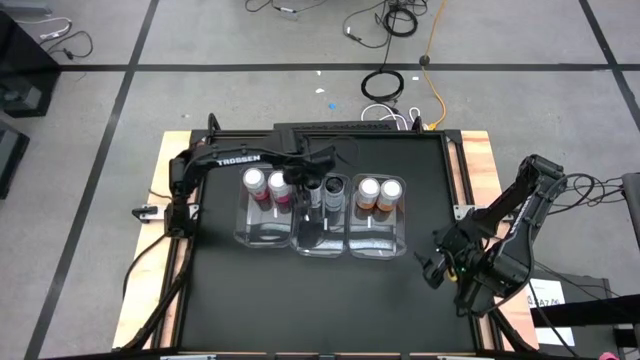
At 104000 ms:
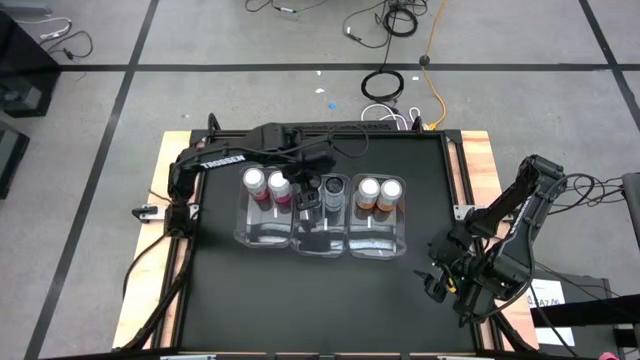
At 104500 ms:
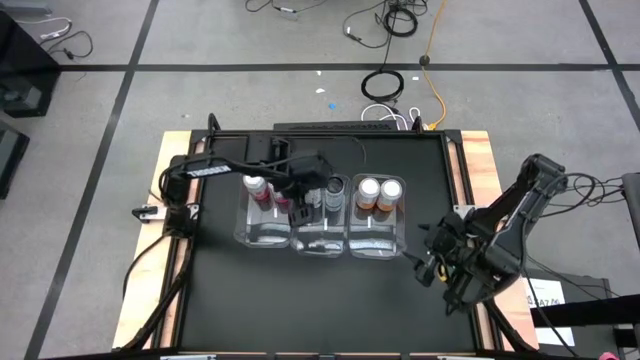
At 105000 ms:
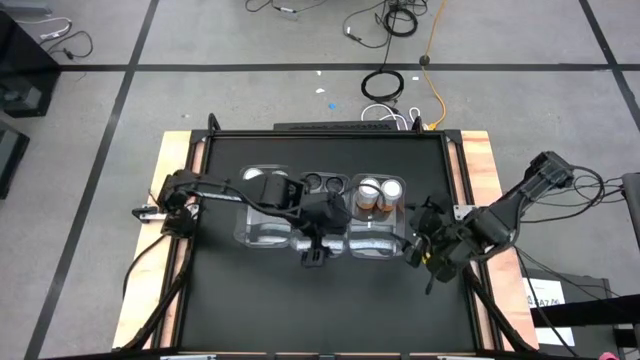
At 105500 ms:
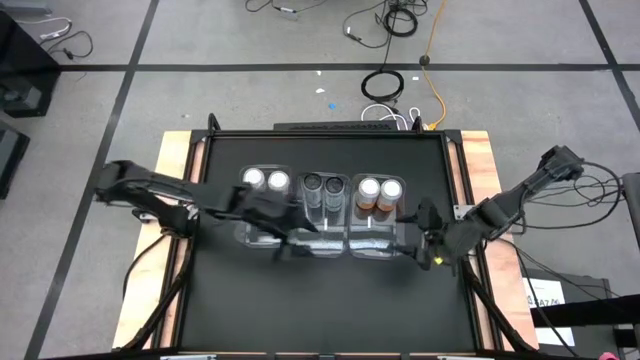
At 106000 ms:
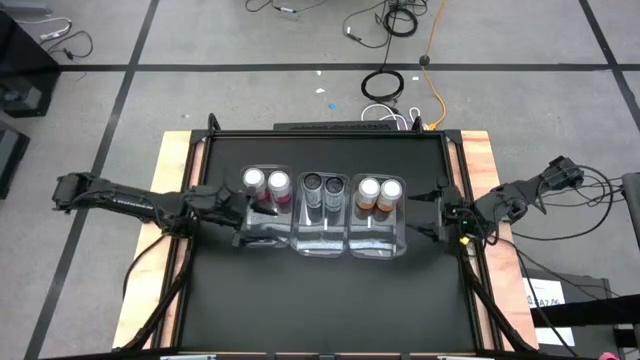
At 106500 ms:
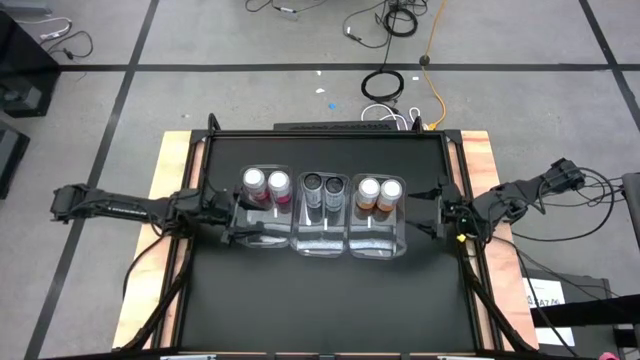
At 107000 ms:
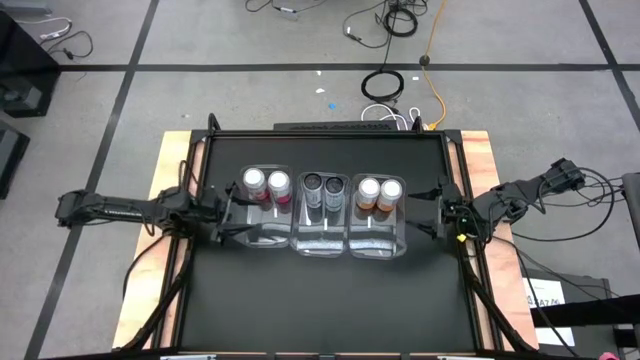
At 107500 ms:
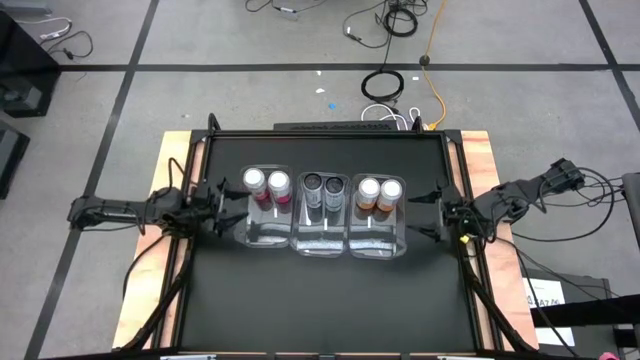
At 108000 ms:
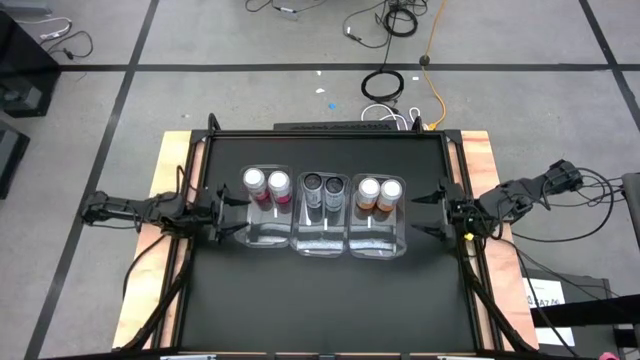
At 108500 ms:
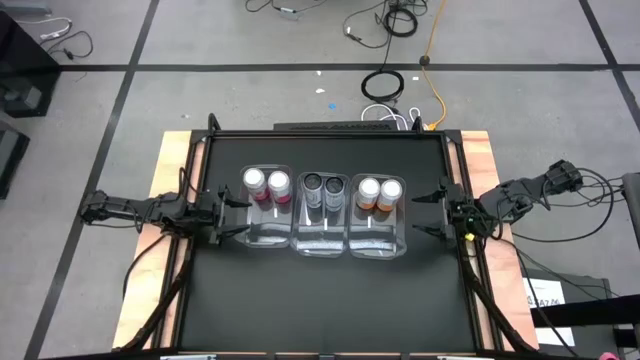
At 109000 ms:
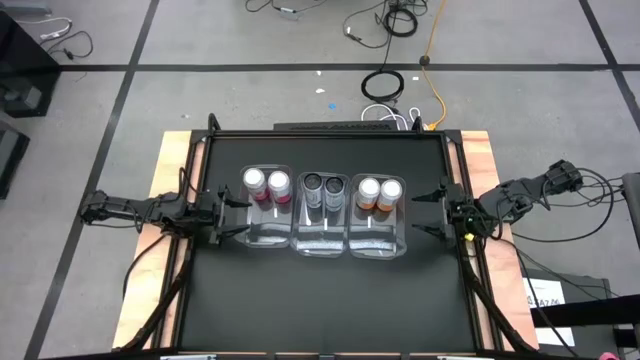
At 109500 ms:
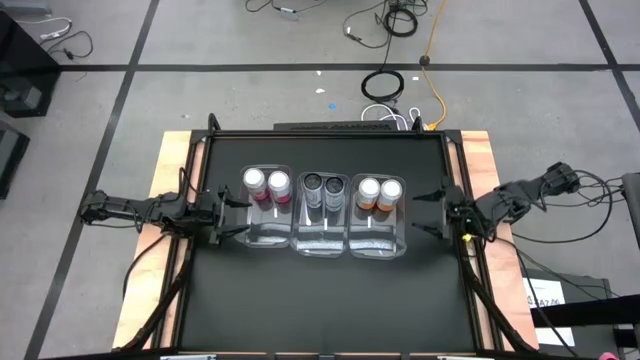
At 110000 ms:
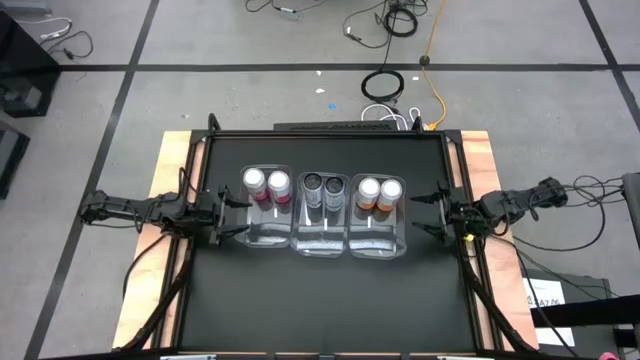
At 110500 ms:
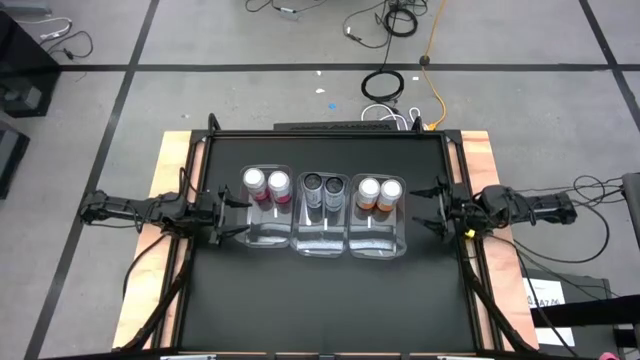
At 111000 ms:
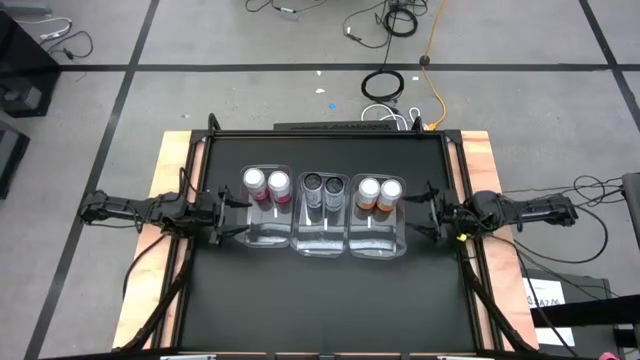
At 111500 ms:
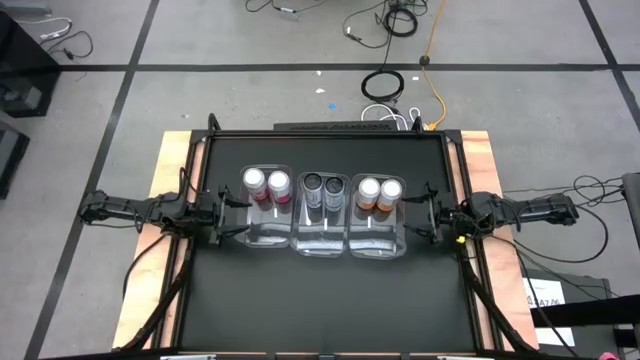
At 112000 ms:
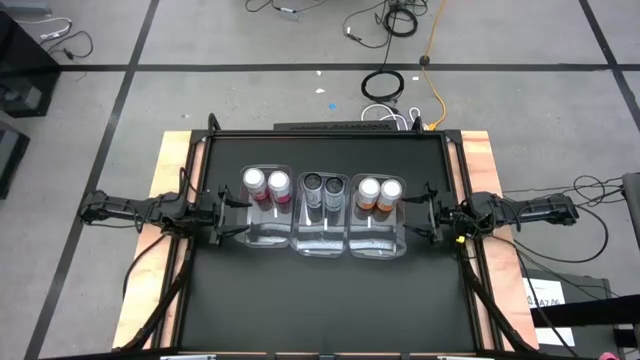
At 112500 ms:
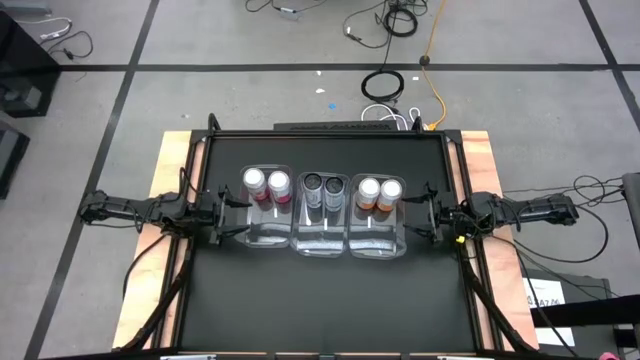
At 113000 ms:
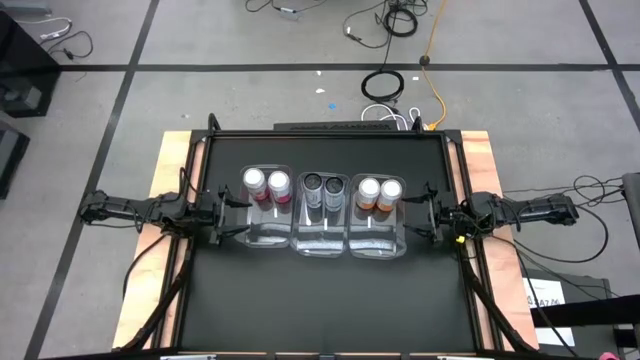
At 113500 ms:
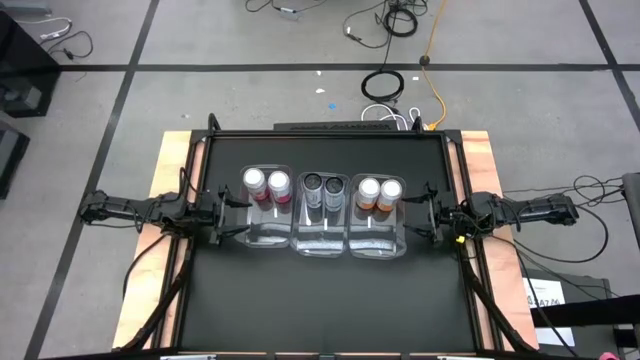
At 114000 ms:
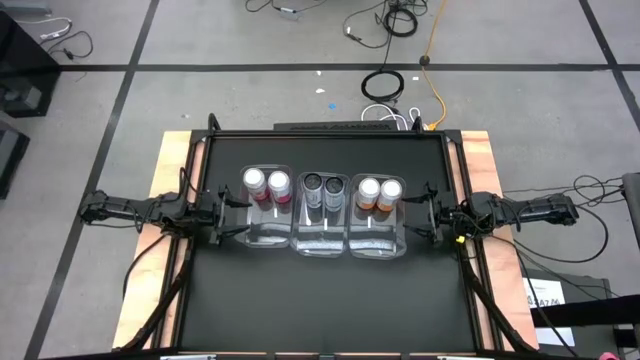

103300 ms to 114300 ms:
Task: Sort soda cans
Return to Home Position

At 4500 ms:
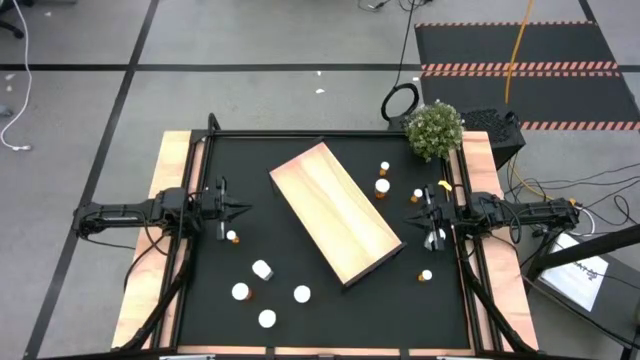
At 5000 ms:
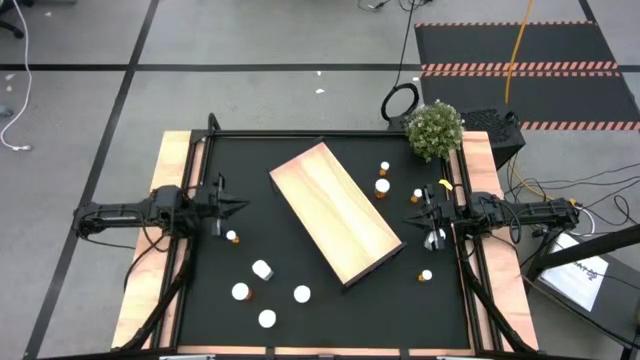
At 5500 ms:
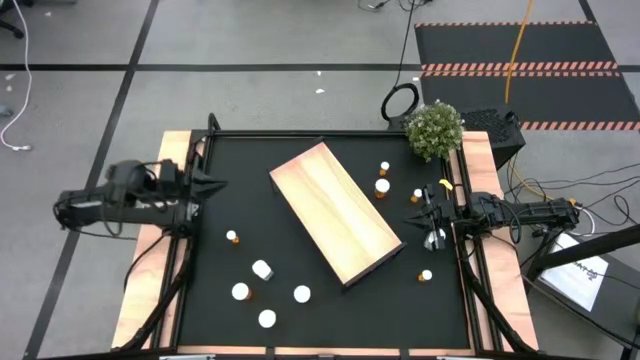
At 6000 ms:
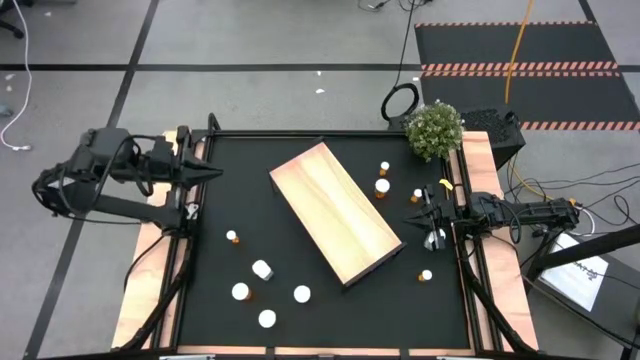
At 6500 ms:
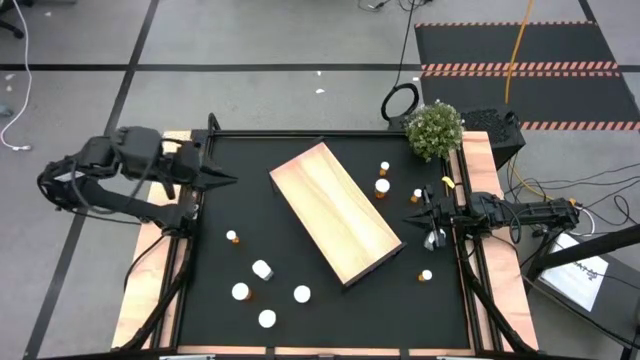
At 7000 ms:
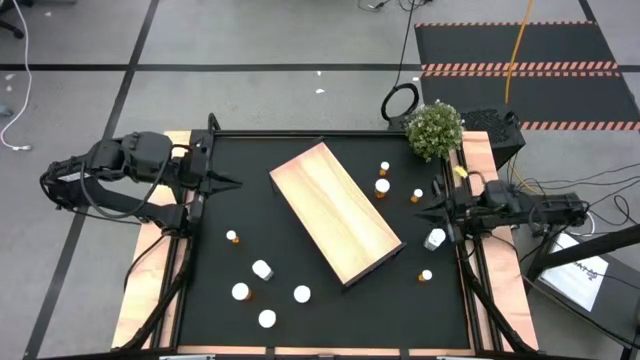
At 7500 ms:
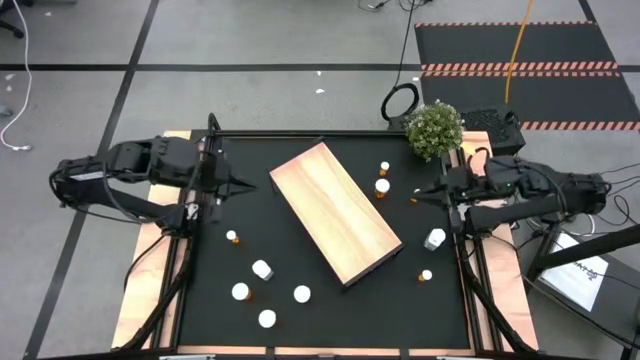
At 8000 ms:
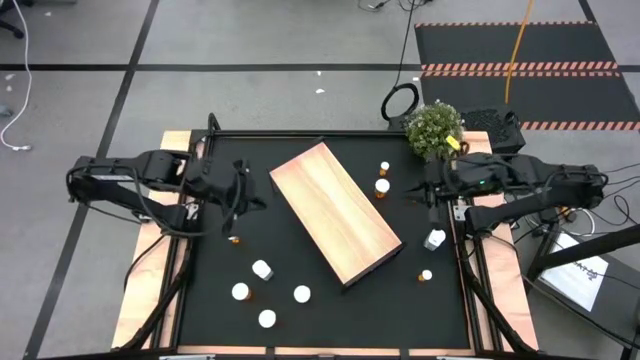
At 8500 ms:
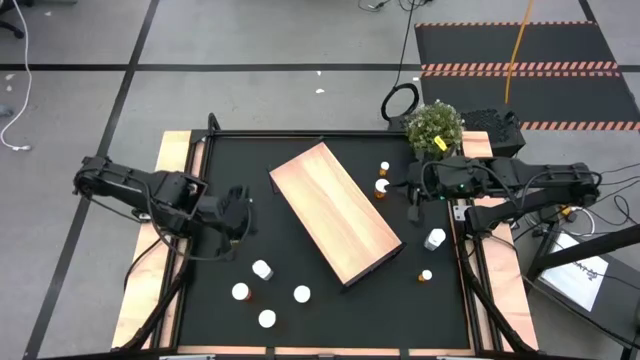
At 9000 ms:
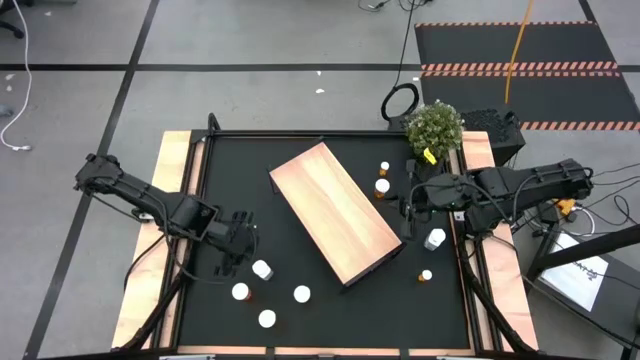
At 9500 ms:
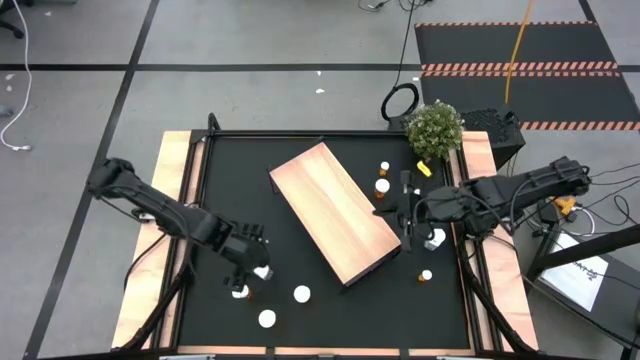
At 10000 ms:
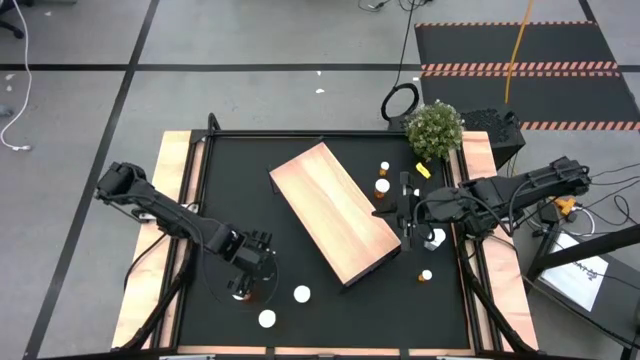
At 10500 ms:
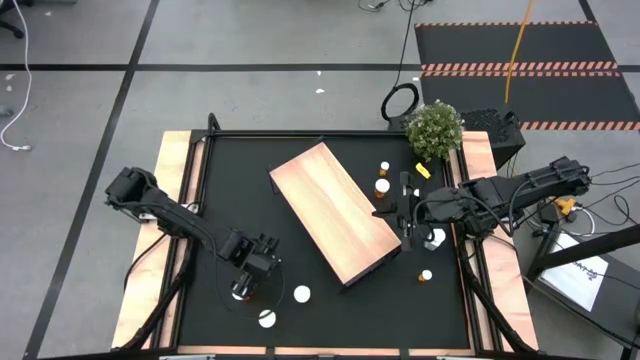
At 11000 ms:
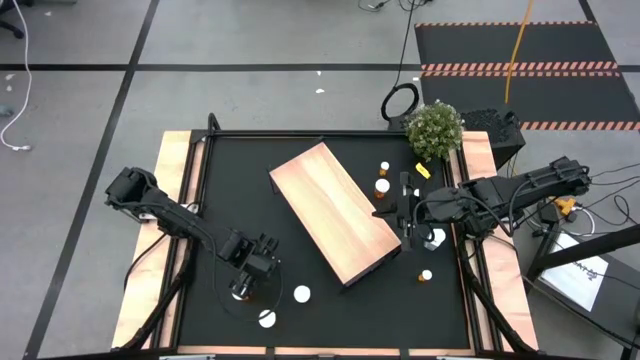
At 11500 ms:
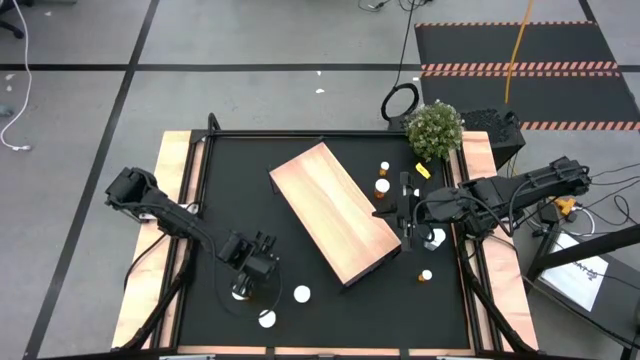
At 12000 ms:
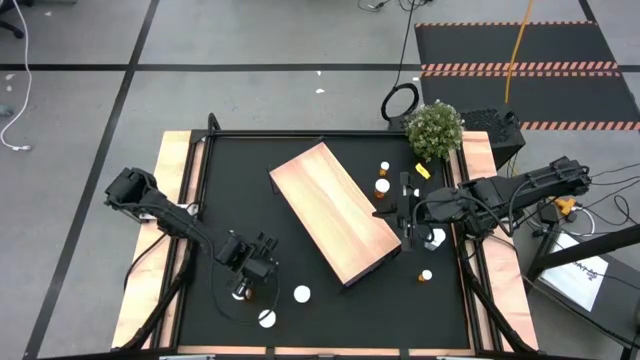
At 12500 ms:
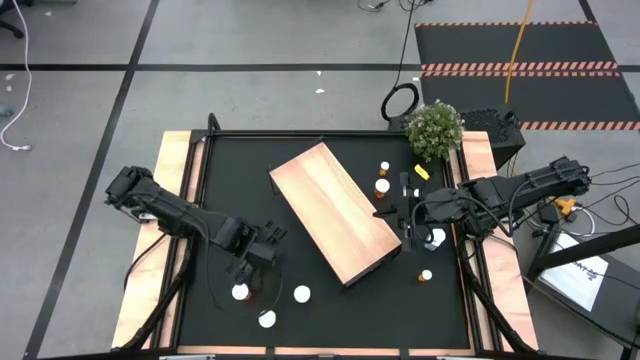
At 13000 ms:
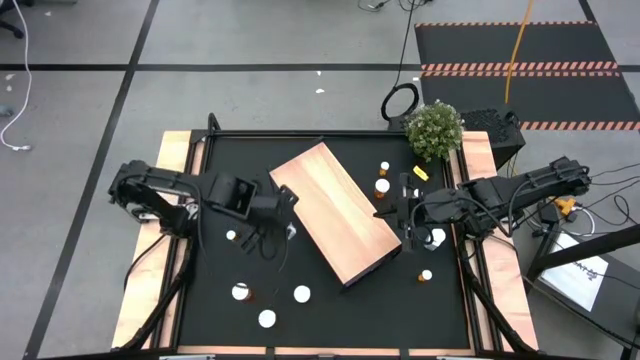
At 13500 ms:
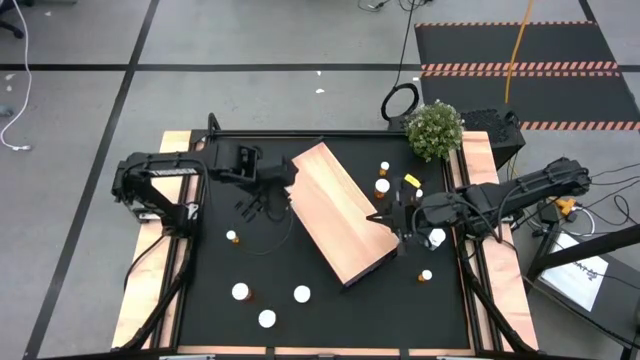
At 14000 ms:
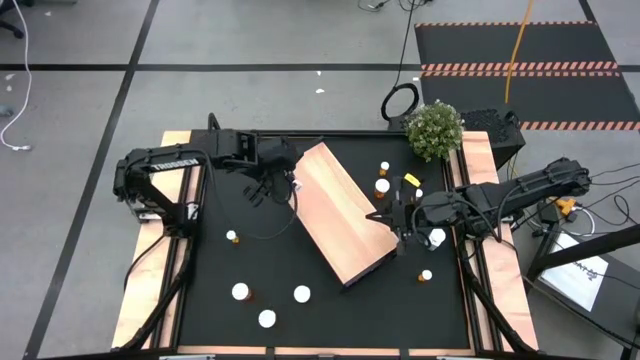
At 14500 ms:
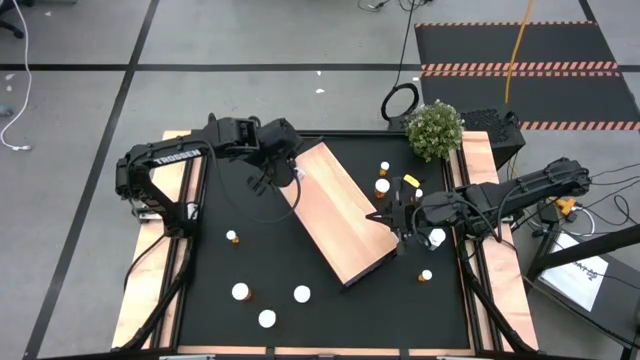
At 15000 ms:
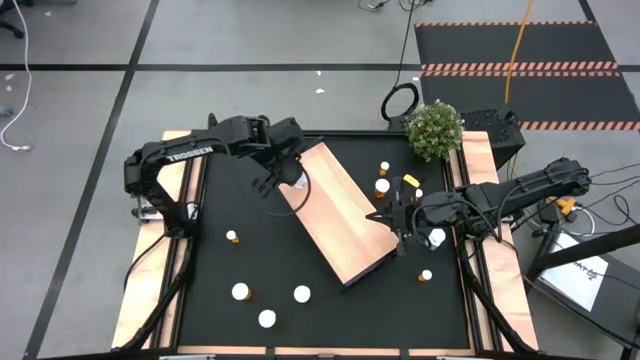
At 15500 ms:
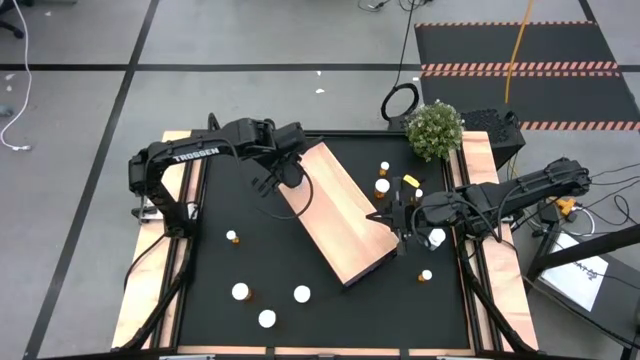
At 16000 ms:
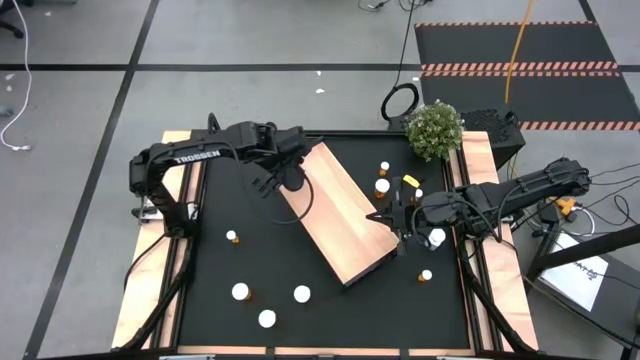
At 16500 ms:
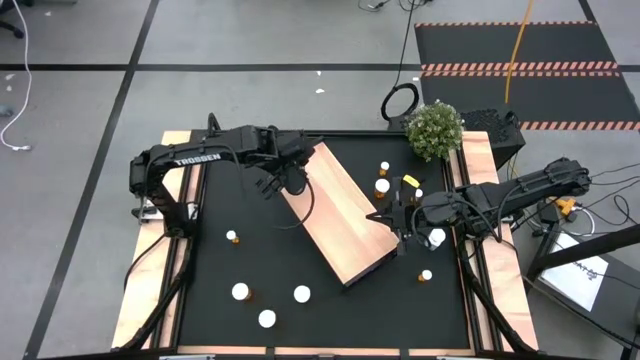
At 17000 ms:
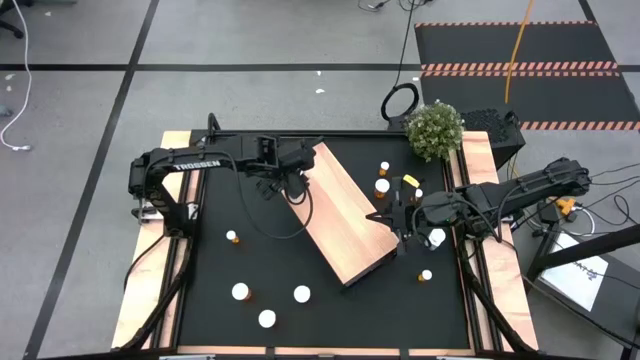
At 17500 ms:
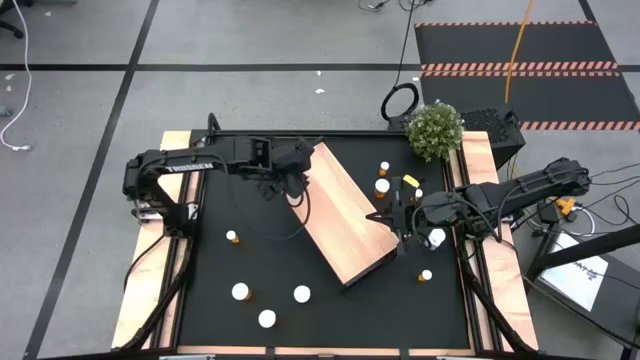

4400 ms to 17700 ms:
Task: Pick and place medicine bottles onto shelf by color
Put the left white pill bottle on the shelf
